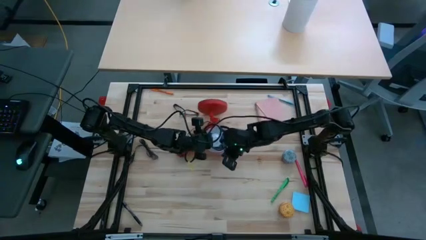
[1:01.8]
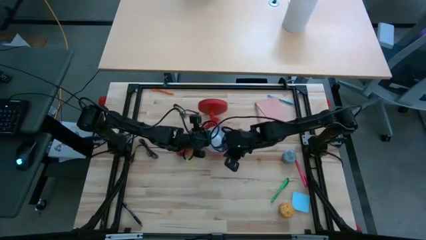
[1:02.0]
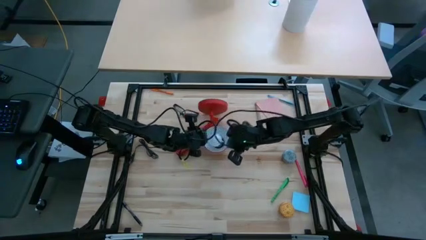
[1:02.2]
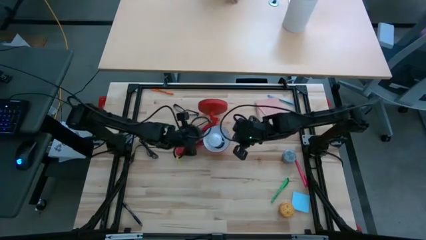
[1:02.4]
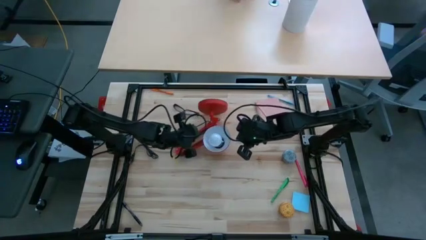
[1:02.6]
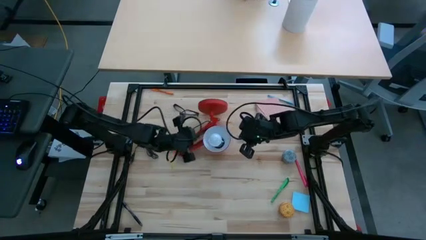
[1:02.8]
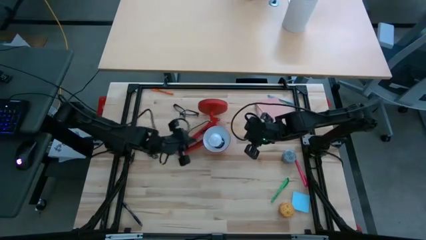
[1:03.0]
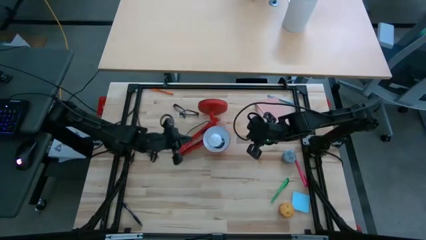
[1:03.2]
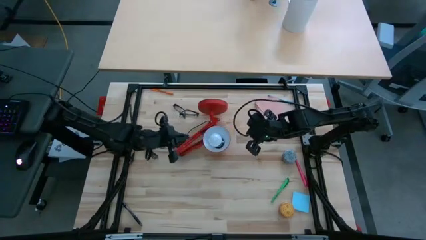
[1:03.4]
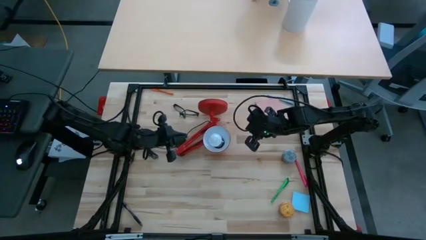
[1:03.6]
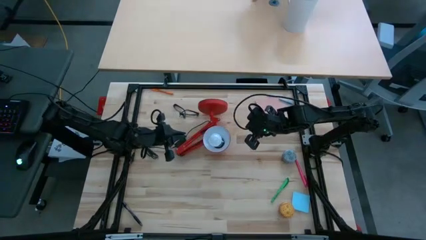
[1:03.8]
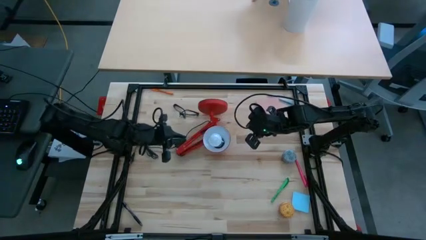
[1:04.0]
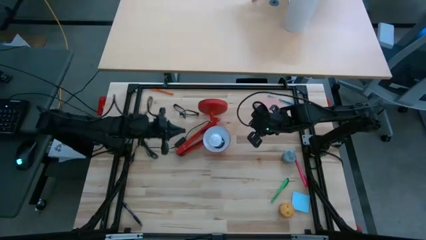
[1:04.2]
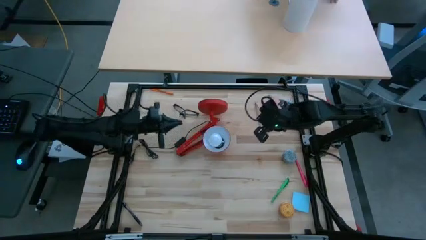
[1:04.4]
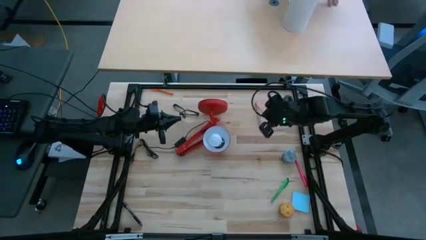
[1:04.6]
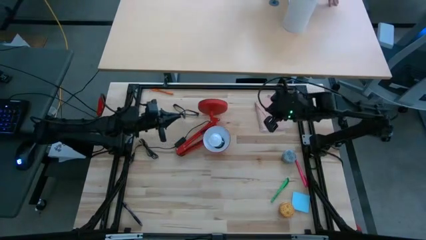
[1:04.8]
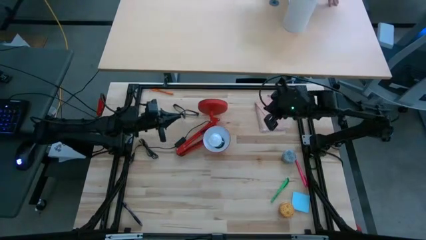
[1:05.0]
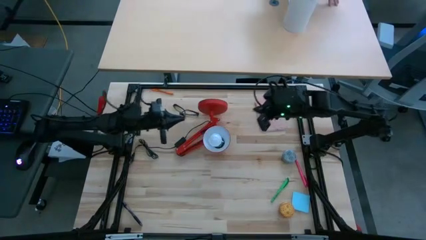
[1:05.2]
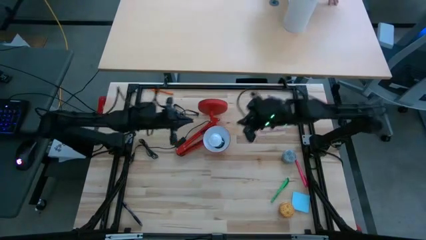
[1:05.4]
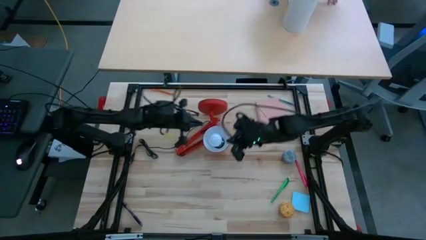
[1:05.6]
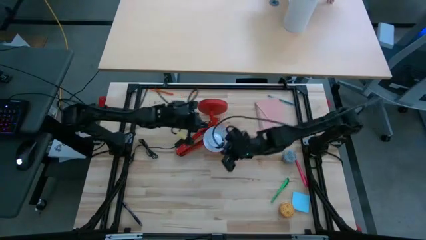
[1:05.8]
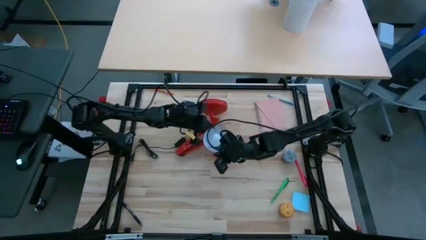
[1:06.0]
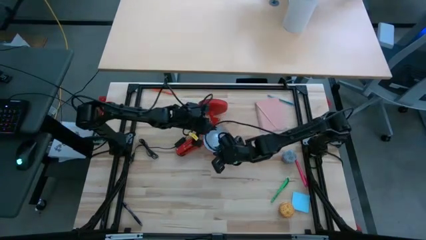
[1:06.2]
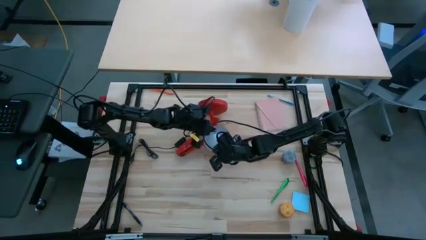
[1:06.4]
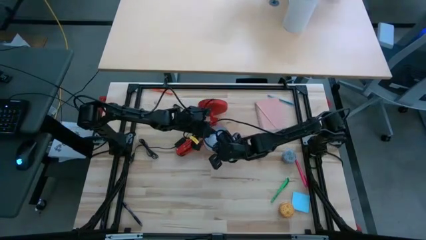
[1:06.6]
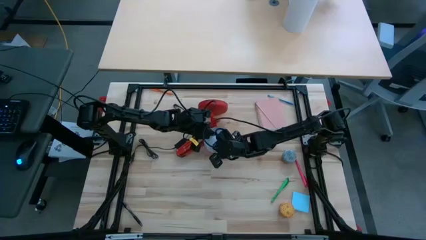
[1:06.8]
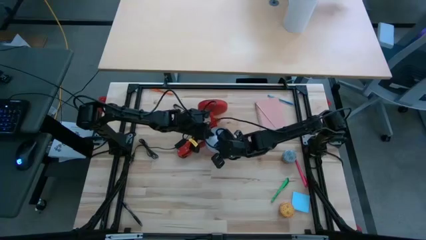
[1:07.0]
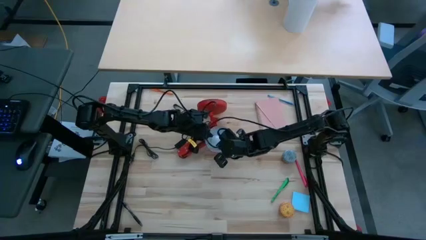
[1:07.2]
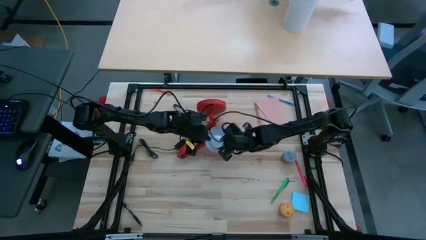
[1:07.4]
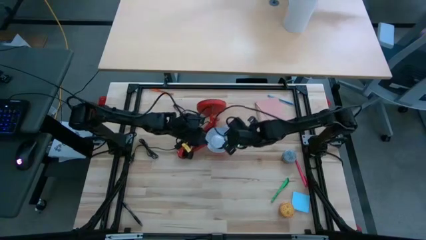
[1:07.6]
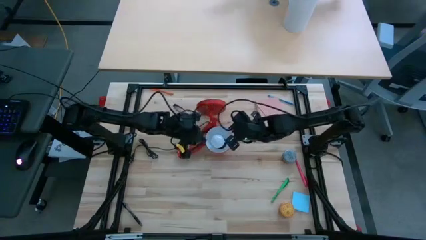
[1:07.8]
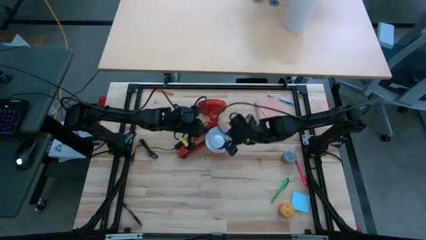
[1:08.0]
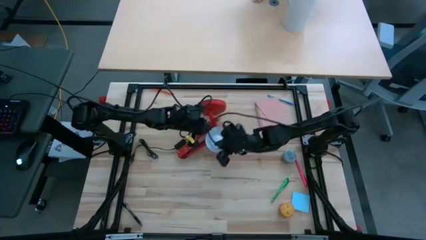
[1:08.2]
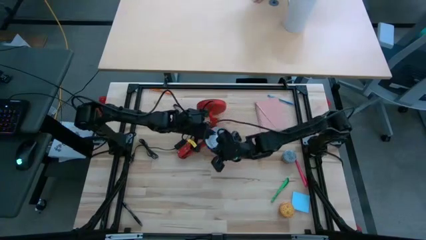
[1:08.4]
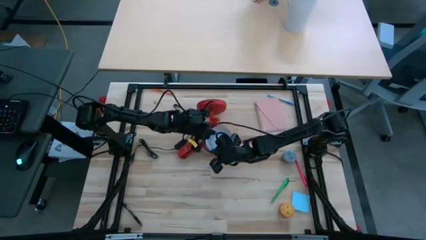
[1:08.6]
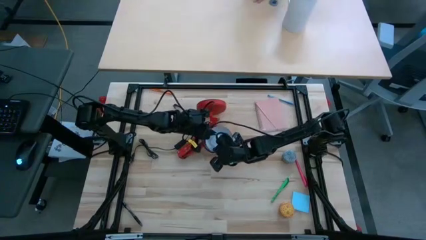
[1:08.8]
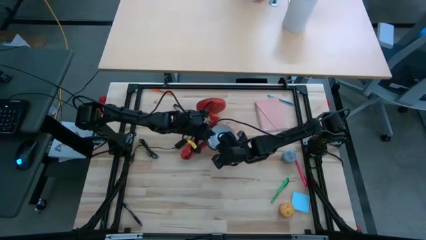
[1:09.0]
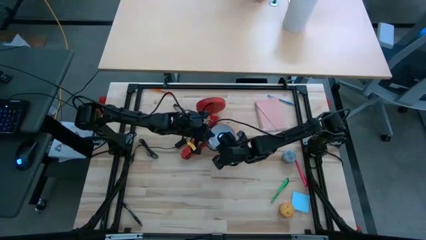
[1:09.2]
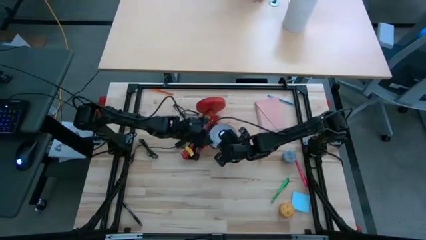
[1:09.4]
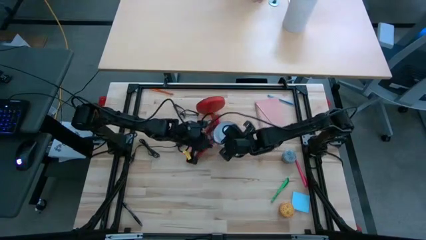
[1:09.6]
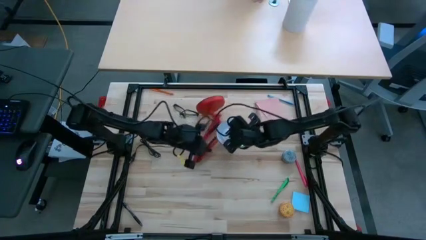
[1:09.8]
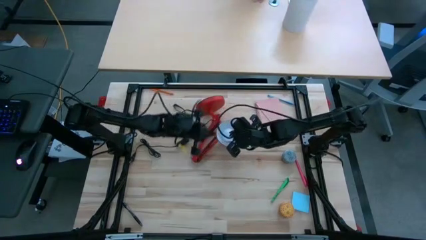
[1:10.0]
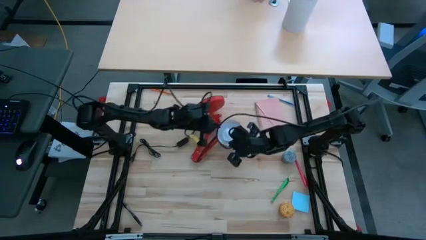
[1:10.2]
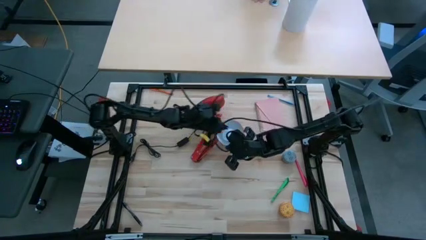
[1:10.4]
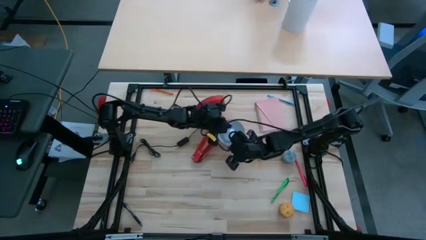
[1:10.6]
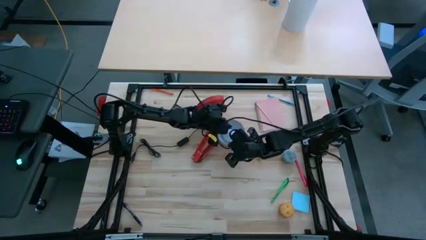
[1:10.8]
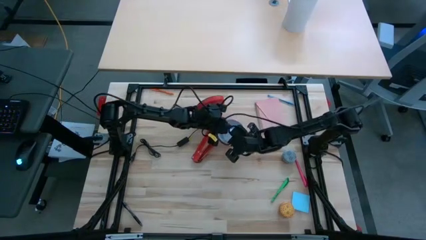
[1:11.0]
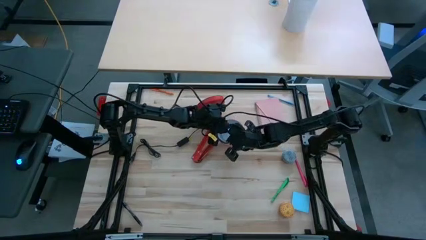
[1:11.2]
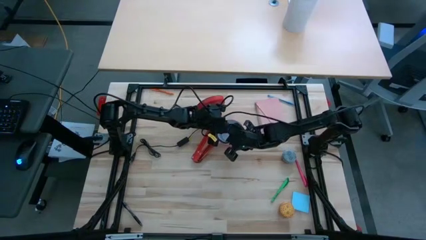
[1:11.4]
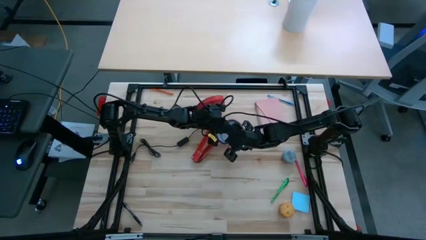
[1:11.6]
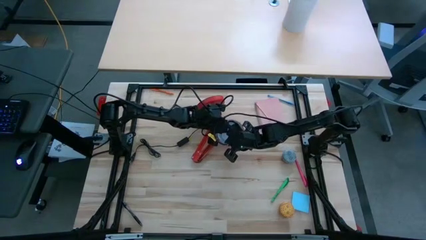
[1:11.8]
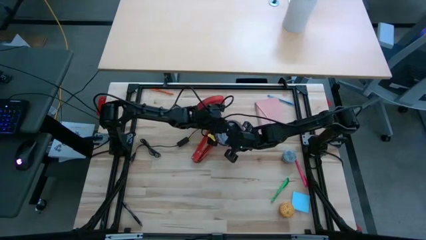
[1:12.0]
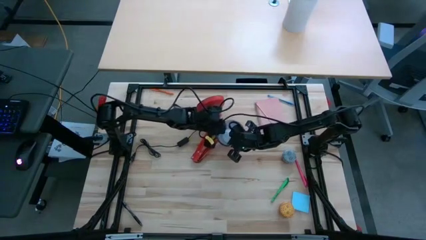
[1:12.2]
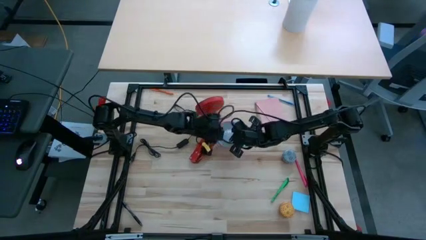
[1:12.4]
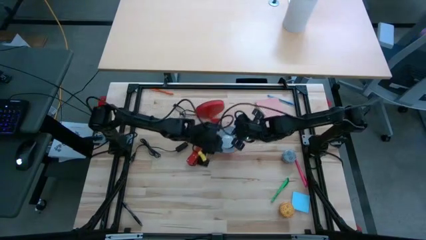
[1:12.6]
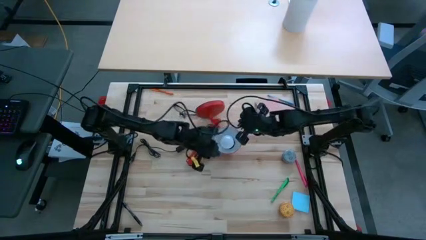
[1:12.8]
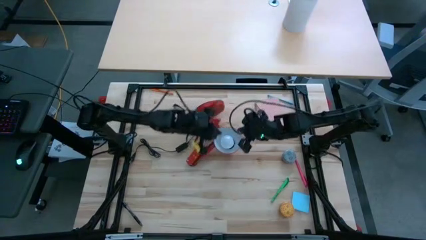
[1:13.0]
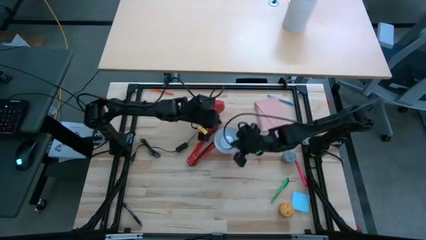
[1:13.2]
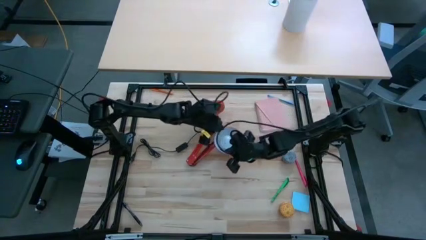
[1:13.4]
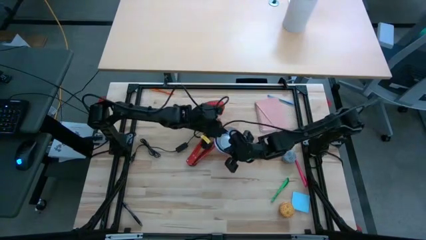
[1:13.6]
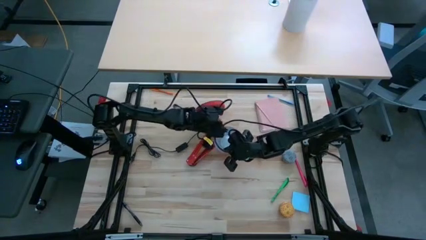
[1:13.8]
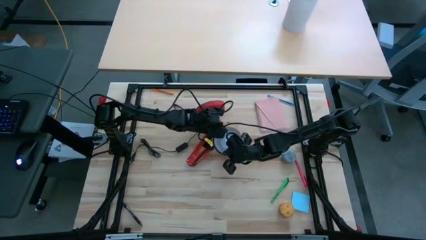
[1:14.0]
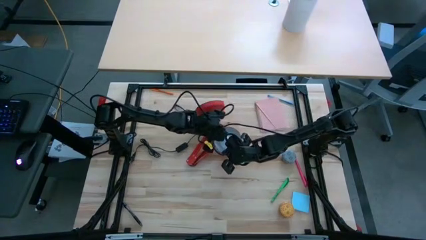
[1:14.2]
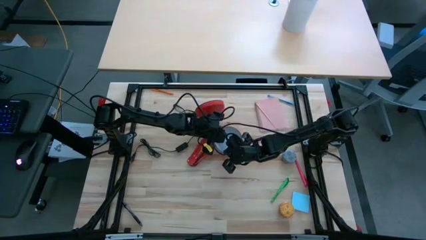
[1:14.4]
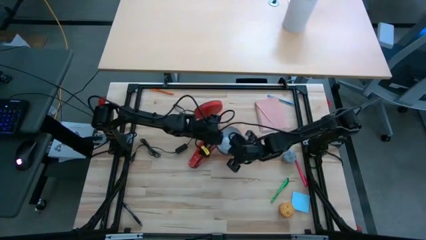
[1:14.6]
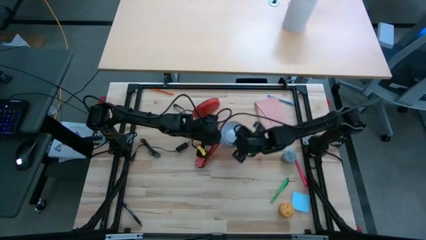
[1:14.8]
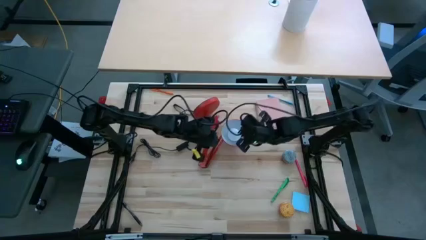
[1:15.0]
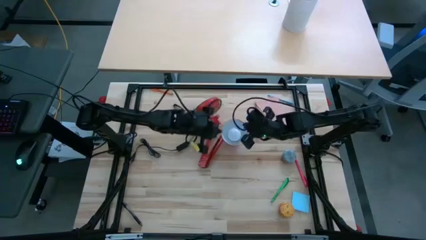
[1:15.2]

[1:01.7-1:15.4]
Task: Screw lightbulb
Remove the lightbulb from the lamp
